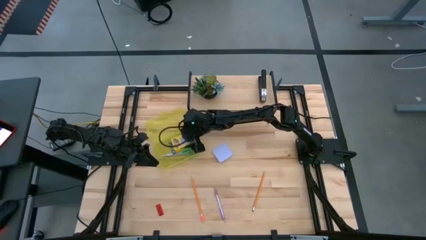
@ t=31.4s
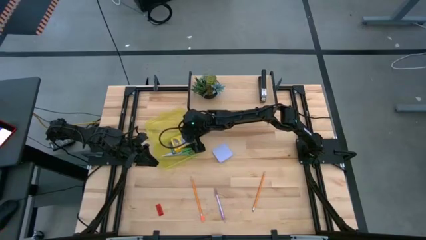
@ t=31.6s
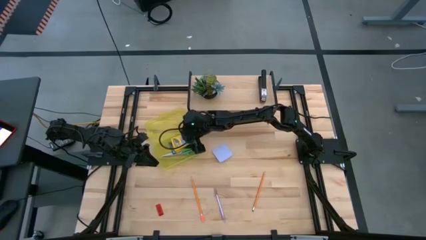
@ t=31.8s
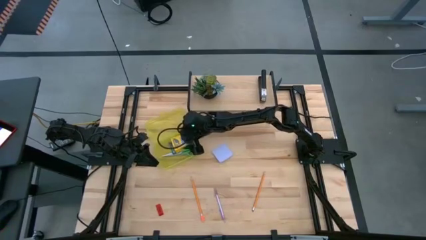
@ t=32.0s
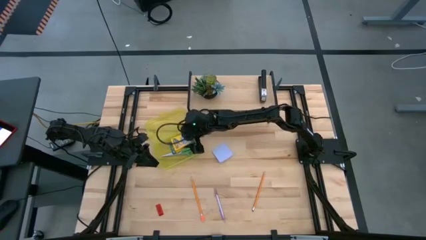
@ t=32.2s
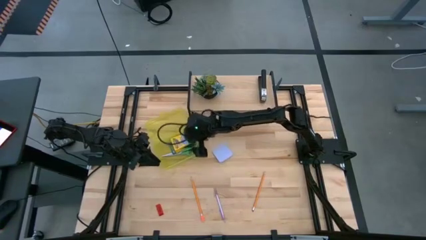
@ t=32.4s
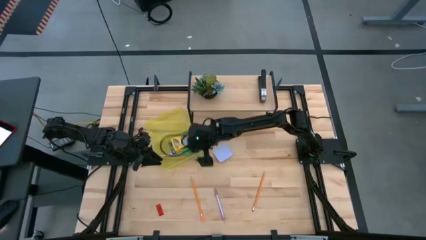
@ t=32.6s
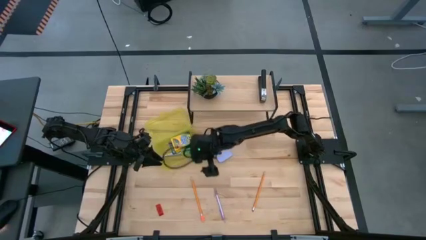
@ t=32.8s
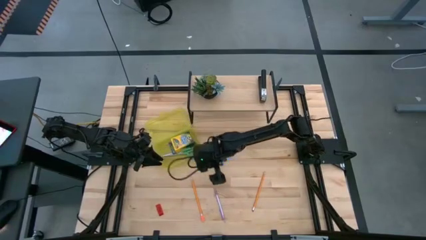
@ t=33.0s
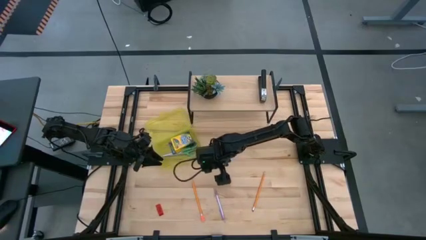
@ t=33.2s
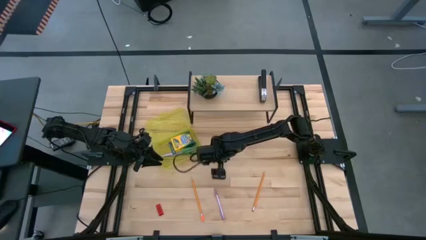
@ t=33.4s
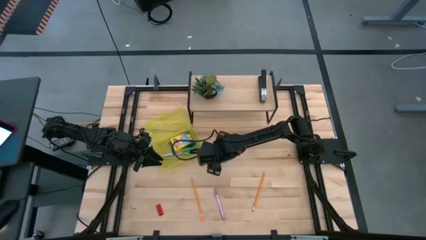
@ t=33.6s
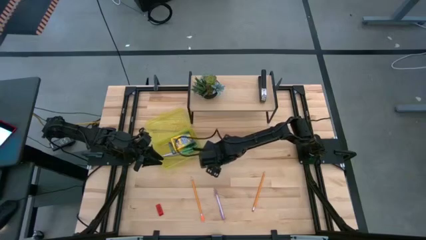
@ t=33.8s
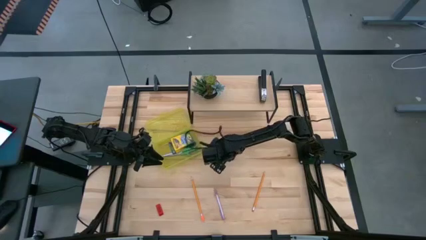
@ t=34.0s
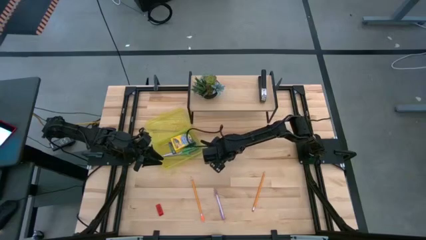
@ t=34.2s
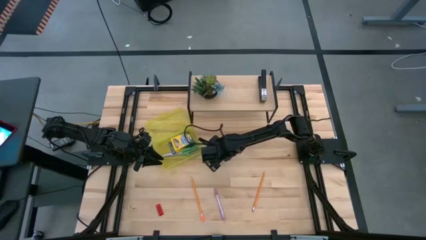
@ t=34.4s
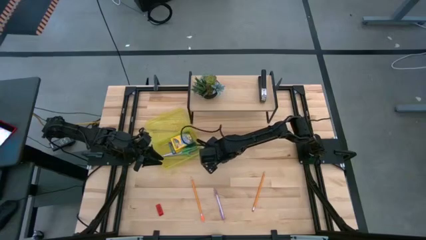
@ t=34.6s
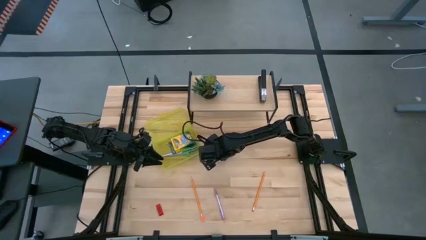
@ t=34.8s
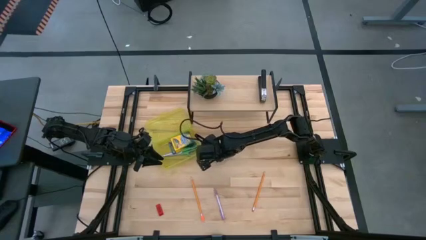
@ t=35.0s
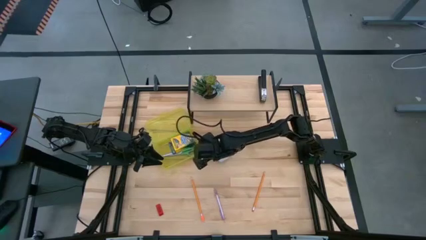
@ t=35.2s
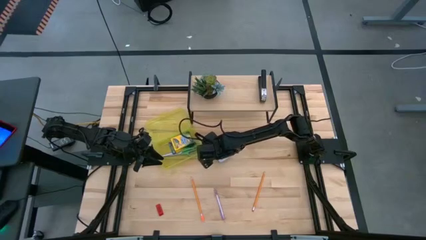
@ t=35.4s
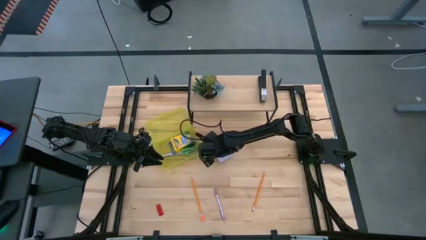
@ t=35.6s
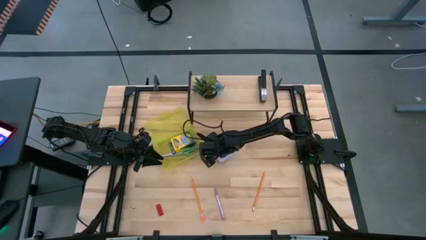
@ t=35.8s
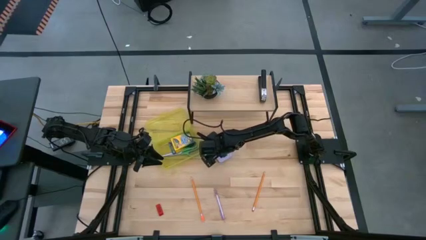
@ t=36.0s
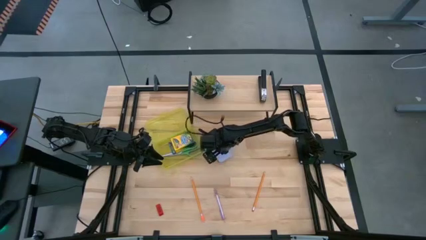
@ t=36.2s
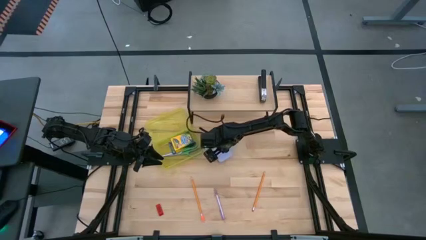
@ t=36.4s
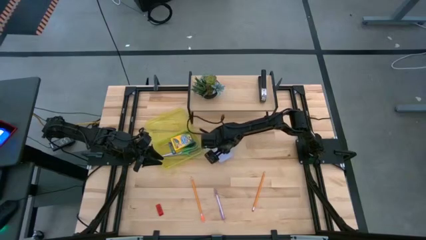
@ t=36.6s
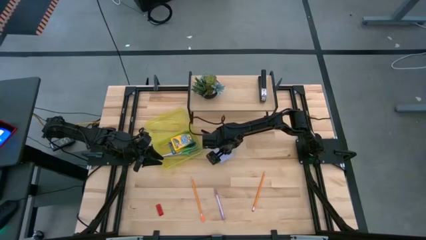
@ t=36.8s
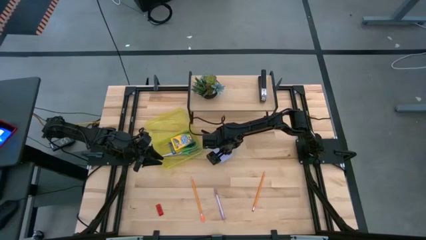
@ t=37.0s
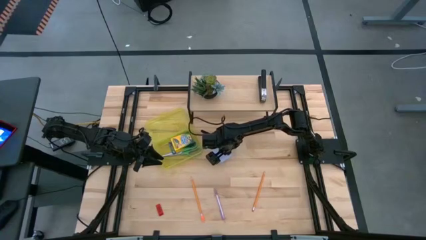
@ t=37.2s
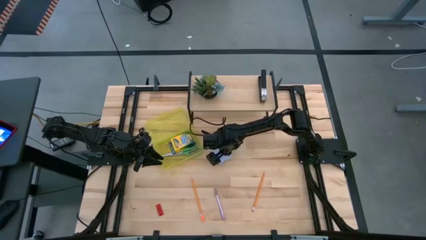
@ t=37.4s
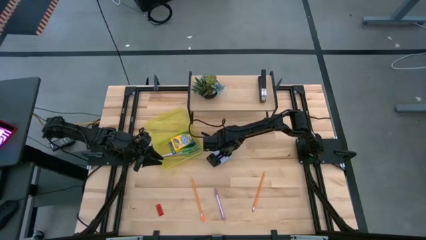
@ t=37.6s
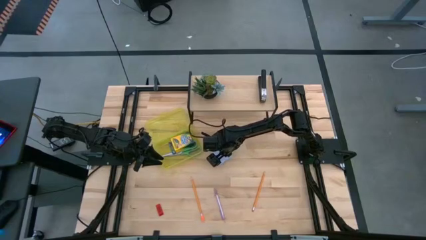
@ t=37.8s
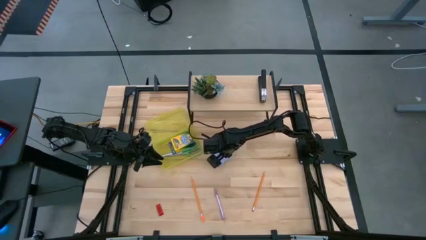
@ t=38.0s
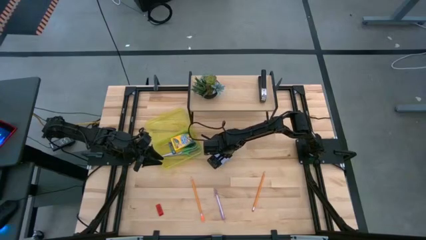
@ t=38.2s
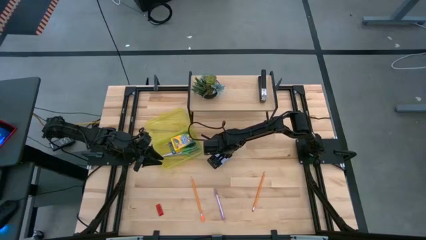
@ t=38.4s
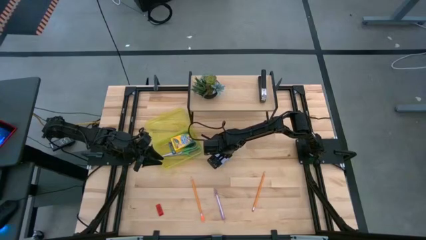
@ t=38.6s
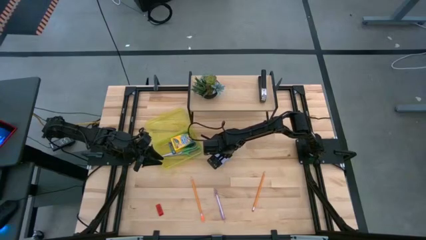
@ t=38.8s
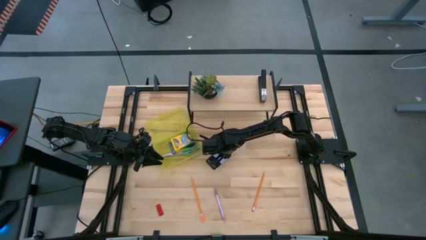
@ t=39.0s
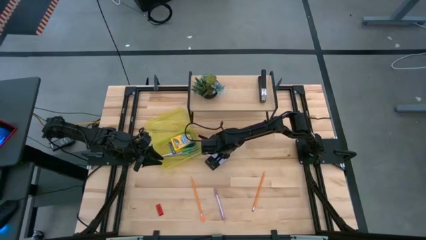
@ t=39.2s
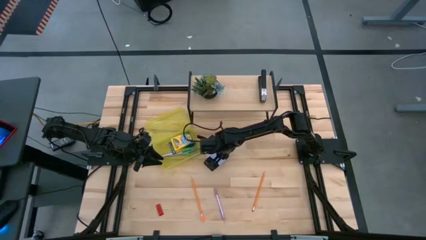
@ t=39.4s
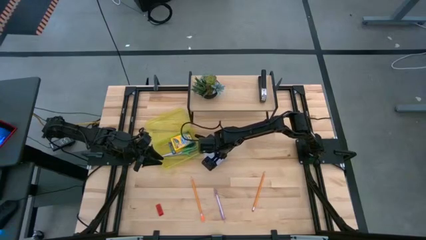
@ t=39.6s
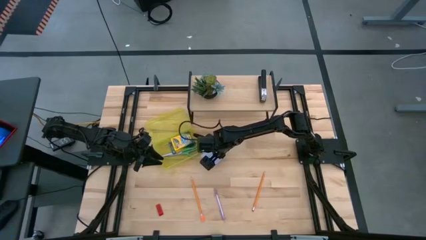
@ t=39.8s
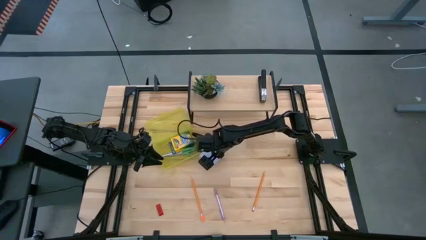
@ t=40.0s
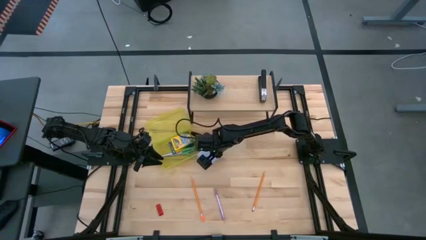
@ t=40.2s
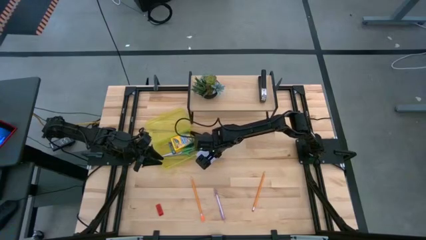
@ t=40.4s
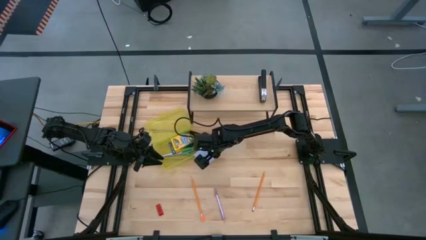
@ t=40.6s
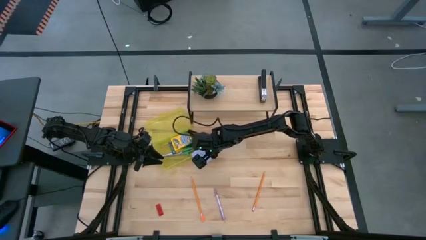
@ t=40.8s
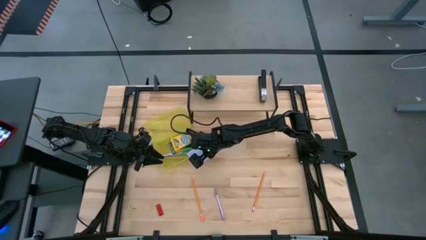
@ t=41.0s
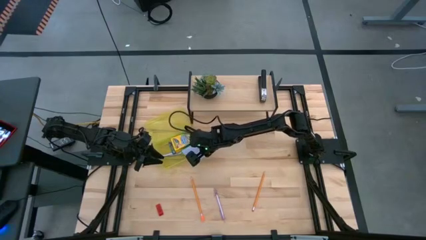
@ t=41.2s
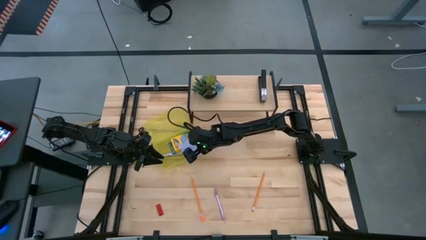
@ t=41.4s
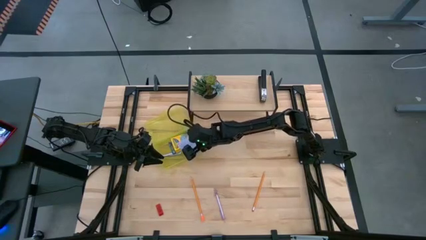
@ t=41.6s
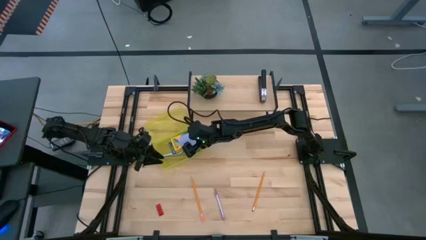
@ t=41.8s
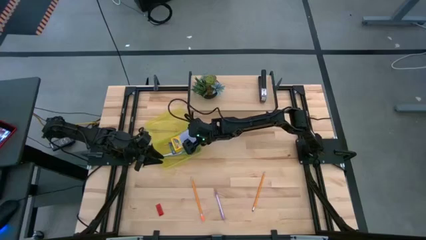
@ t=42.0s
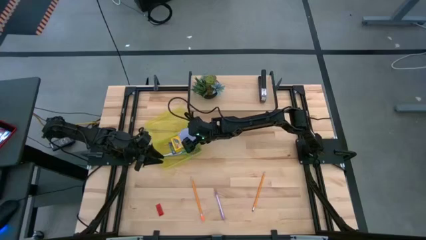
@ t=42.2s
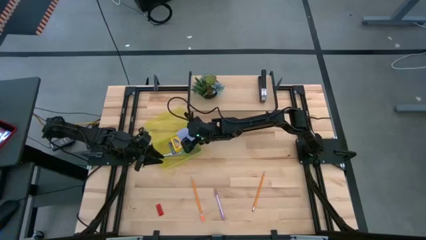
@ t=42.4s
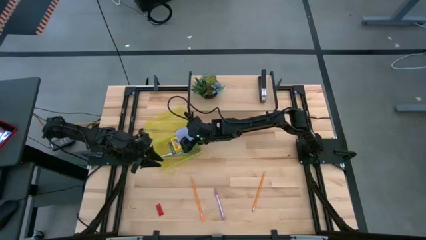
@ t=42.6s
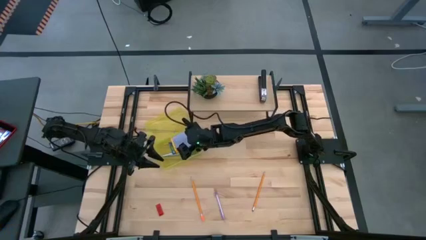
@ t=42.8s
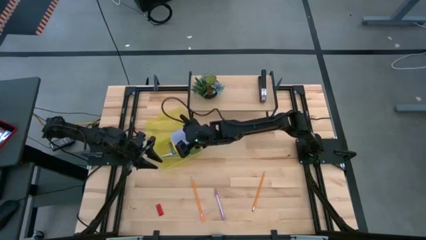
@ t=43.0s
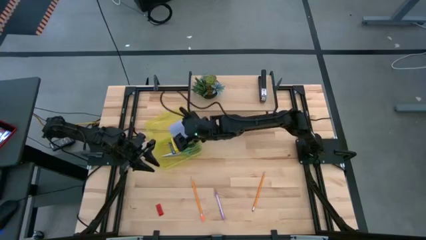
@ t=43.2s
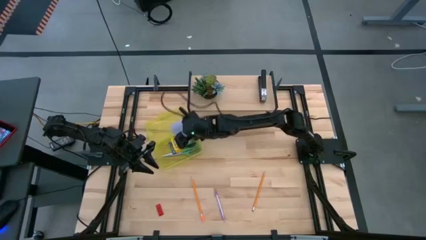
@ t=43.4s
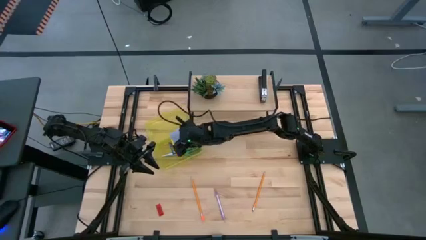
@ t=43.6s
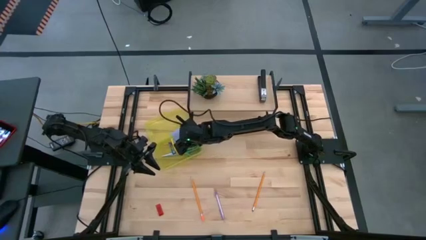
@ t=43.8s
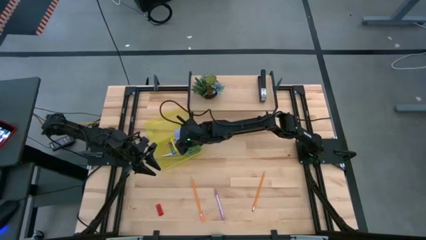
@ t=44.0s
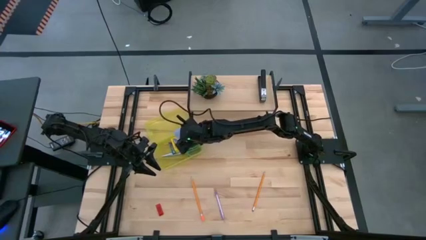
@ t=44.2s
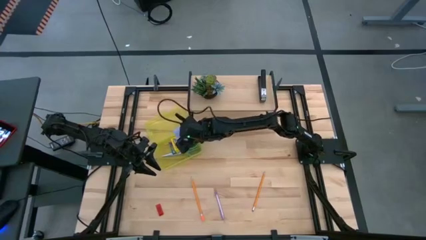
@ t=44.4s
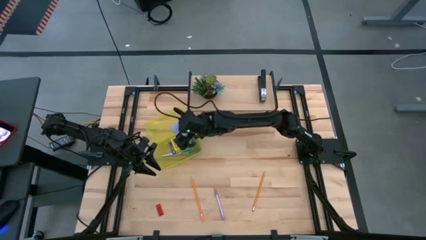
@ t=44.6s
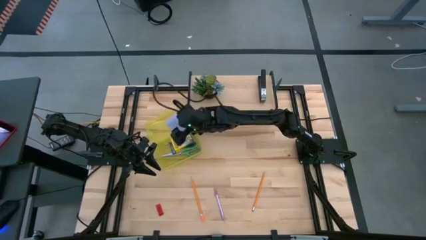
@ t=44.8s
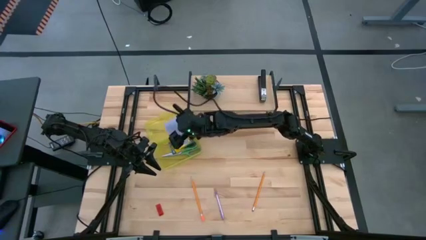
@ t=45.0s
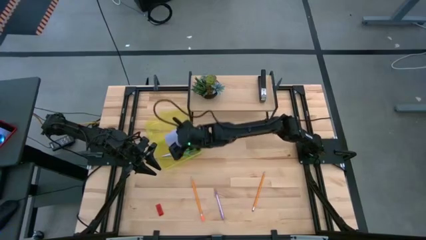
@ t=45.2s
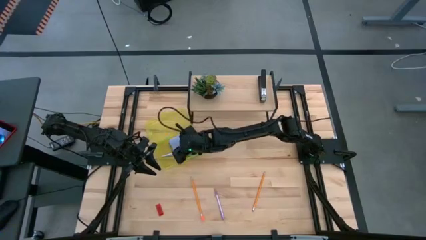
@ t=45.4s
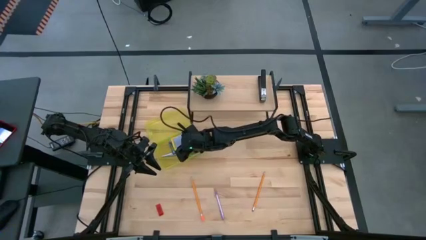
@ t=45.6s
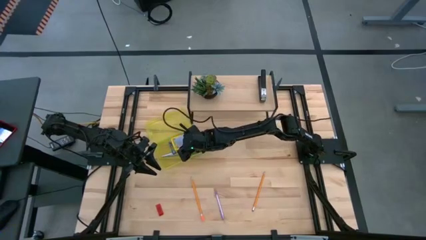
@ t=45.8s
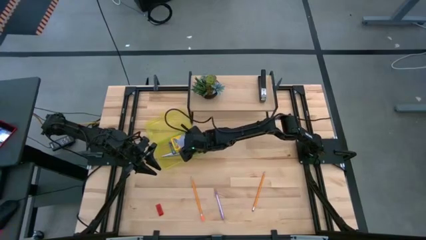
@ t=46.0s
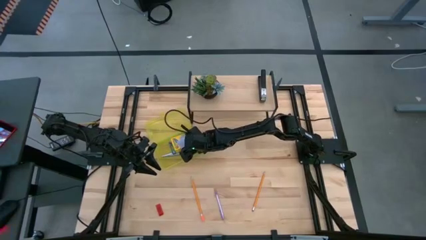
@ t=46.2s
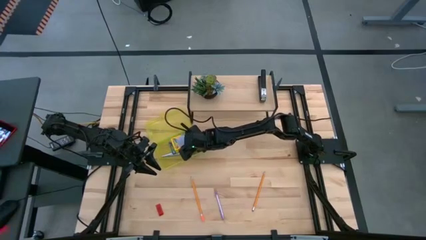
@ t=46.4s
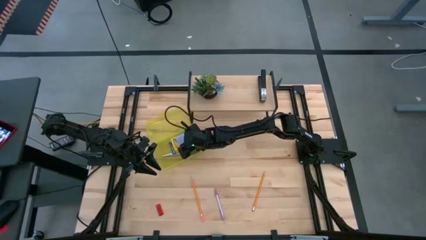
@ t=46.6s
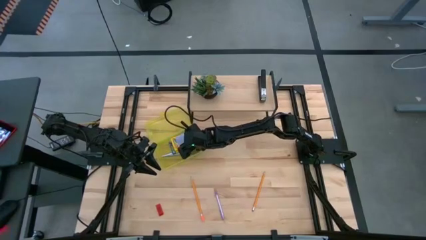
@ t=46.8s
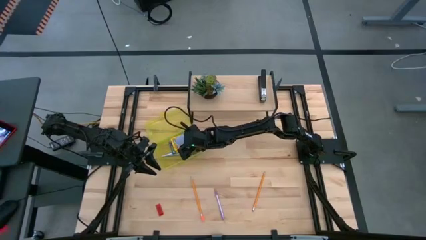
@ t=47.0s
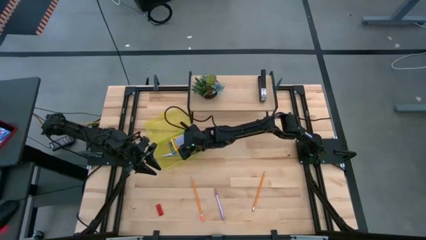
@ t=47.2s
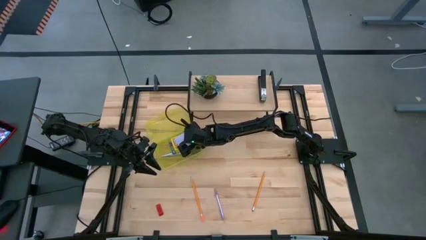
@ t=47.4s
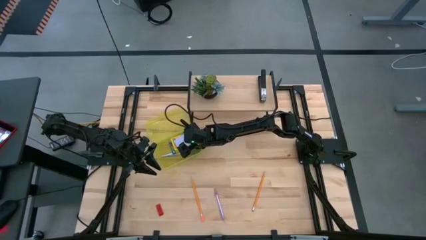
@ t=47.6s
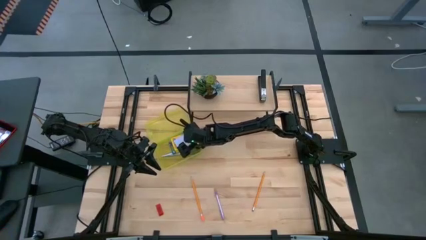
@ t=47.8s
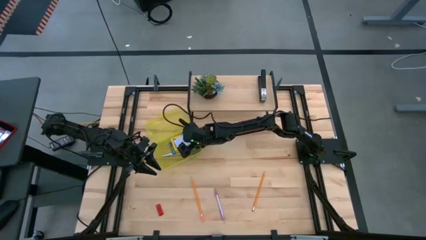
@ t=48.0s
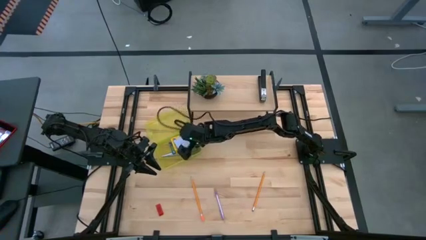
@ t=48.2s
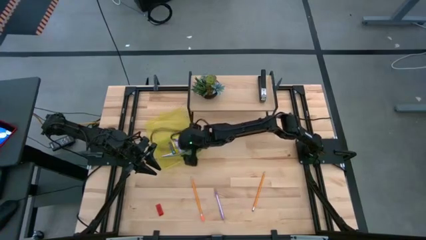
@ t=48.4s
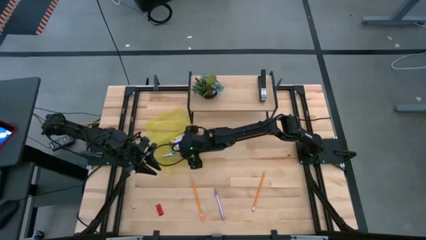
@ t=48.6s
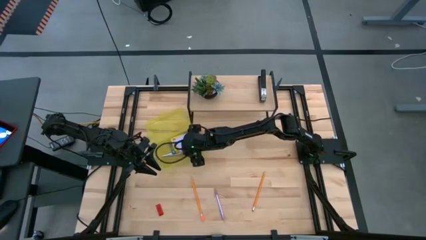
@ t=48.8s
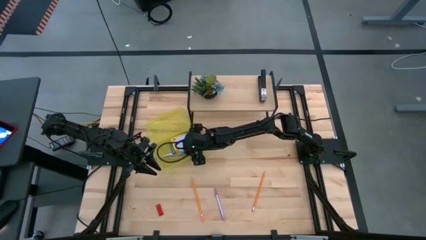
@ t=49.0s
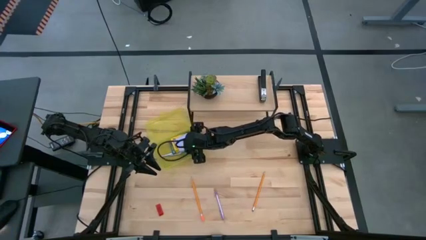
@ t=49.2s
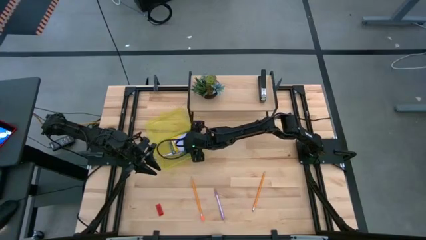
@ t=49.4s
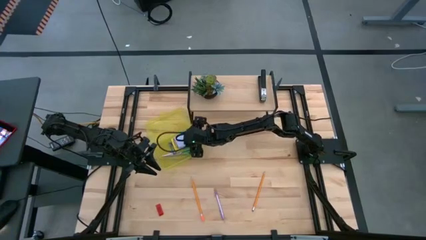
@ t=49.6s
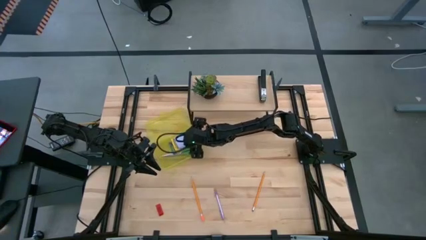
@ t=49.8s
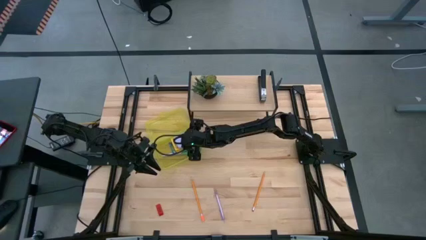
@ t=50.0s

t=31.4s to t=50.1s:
Task: Pack school essentials
Put the purple sticky notes into the yellow supply box
